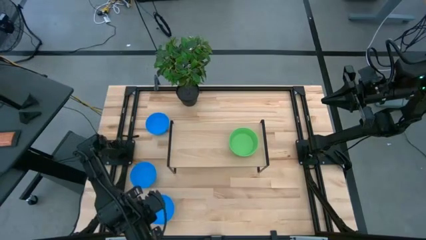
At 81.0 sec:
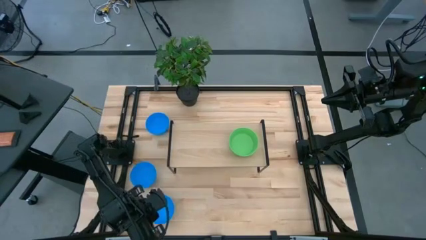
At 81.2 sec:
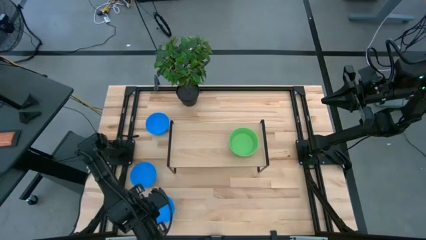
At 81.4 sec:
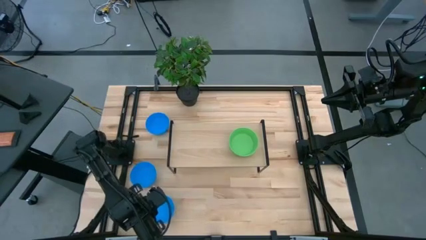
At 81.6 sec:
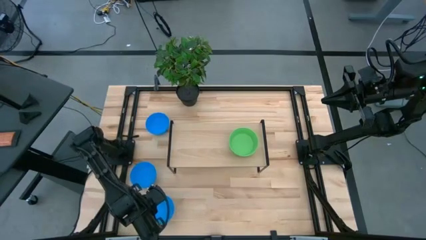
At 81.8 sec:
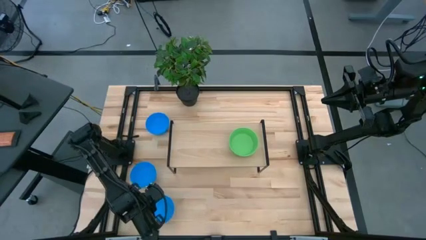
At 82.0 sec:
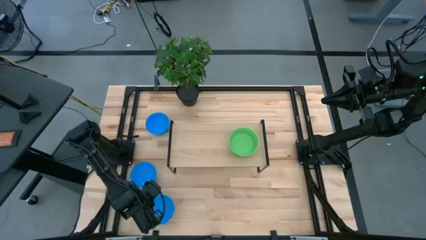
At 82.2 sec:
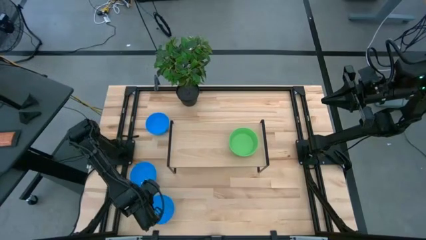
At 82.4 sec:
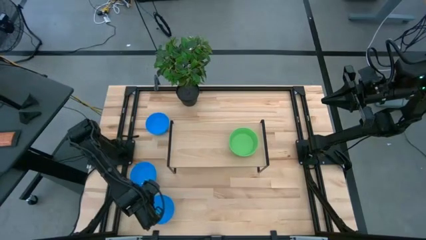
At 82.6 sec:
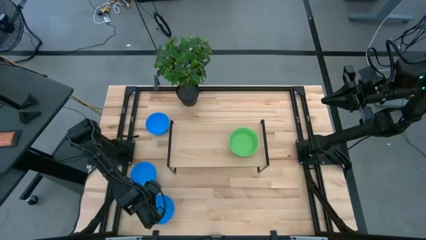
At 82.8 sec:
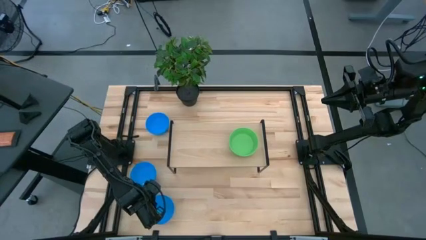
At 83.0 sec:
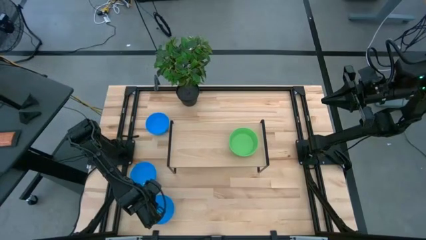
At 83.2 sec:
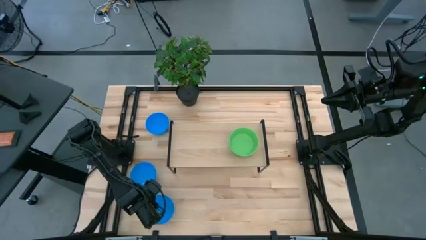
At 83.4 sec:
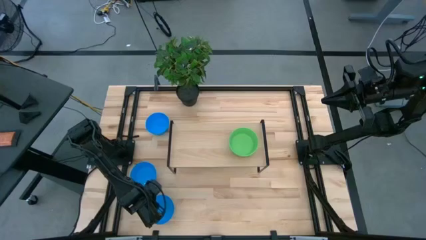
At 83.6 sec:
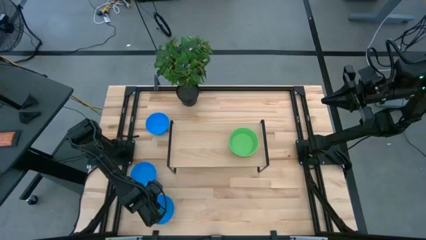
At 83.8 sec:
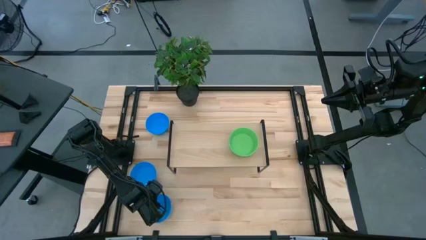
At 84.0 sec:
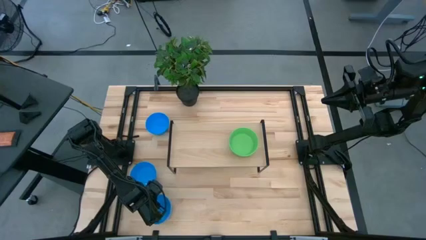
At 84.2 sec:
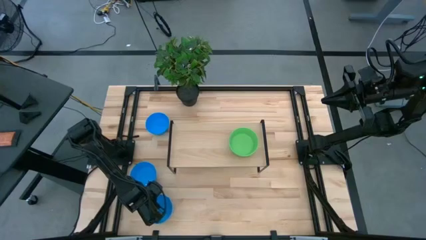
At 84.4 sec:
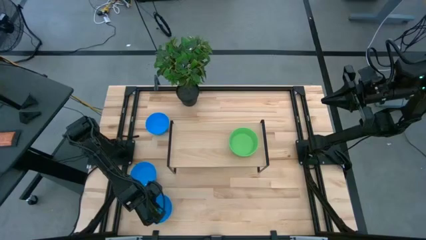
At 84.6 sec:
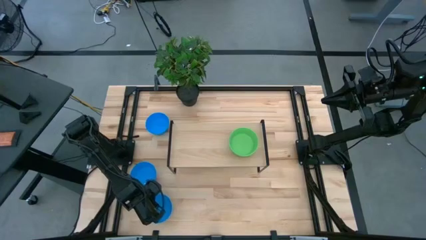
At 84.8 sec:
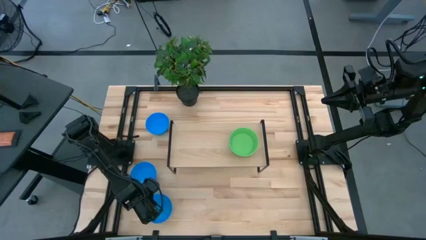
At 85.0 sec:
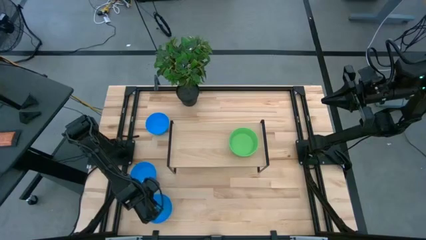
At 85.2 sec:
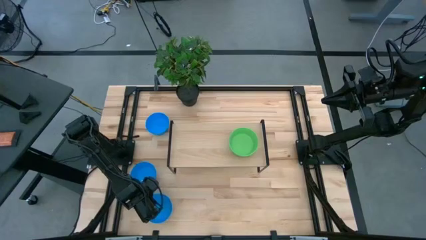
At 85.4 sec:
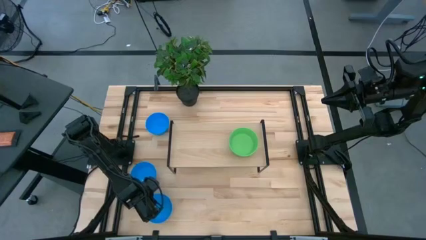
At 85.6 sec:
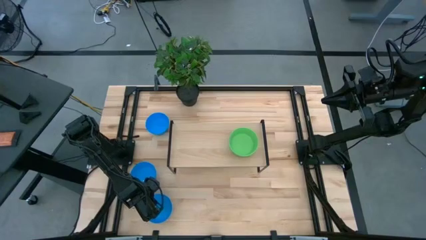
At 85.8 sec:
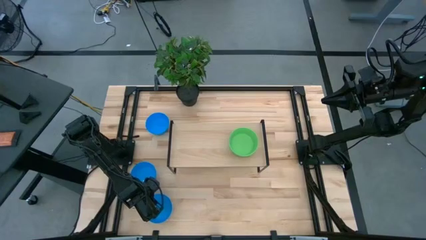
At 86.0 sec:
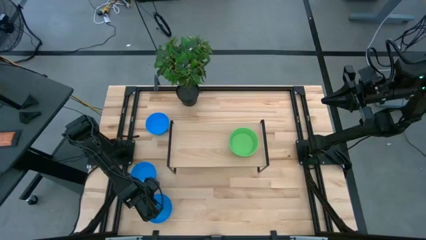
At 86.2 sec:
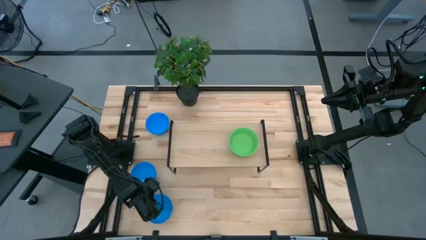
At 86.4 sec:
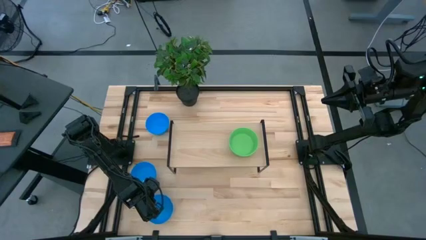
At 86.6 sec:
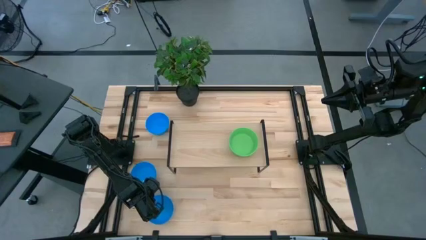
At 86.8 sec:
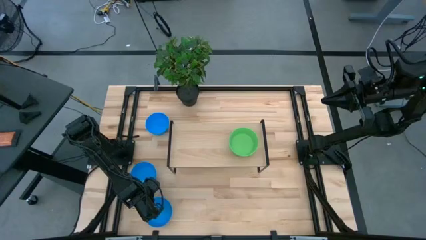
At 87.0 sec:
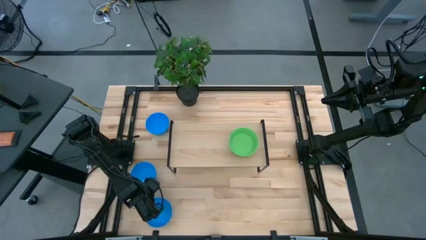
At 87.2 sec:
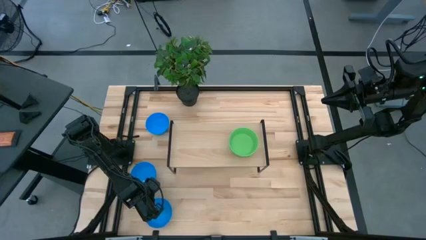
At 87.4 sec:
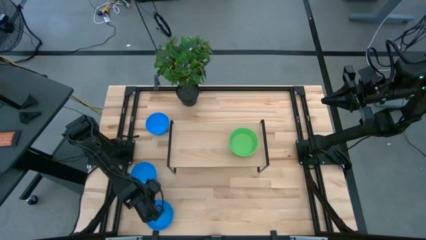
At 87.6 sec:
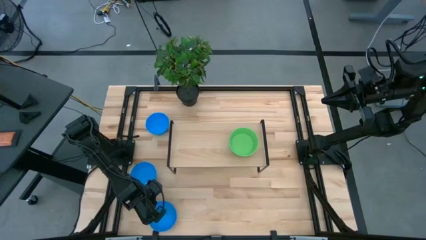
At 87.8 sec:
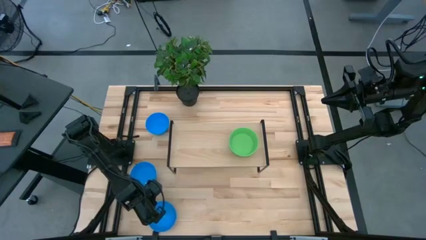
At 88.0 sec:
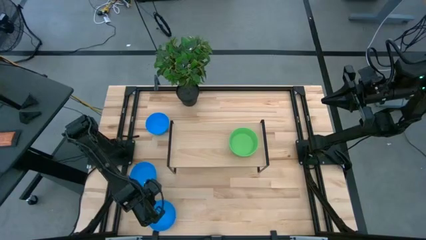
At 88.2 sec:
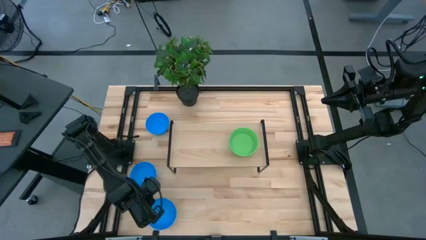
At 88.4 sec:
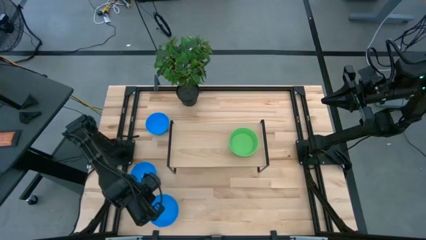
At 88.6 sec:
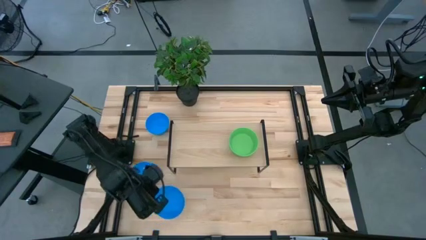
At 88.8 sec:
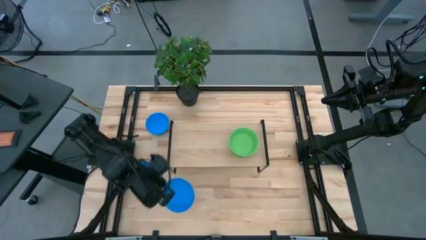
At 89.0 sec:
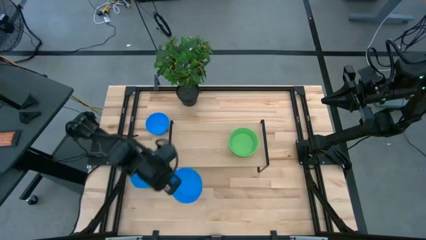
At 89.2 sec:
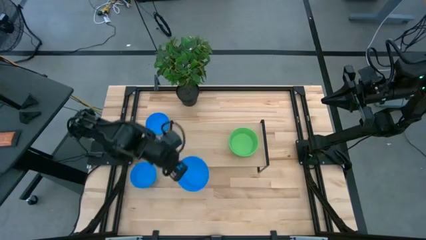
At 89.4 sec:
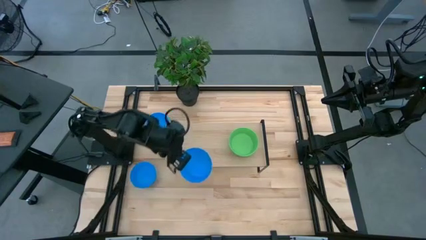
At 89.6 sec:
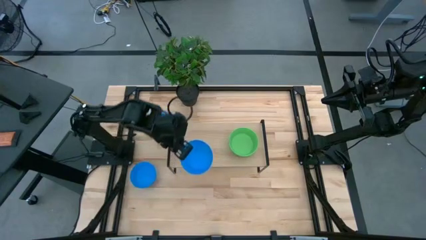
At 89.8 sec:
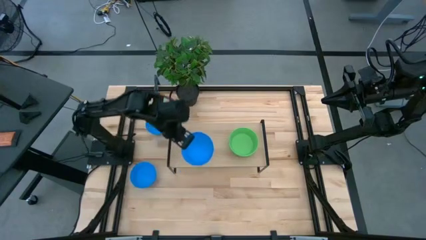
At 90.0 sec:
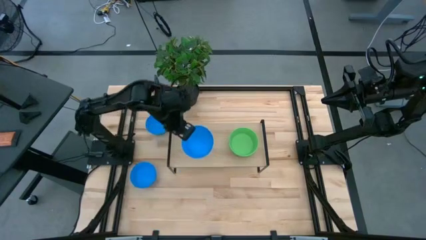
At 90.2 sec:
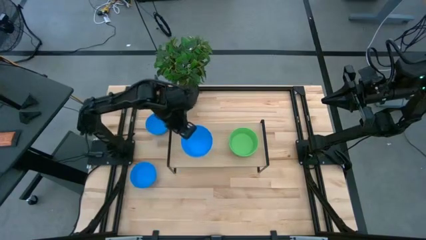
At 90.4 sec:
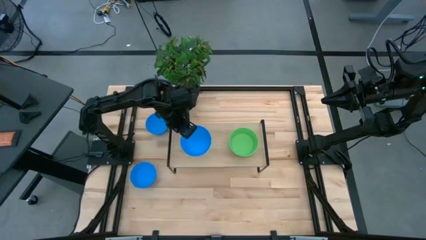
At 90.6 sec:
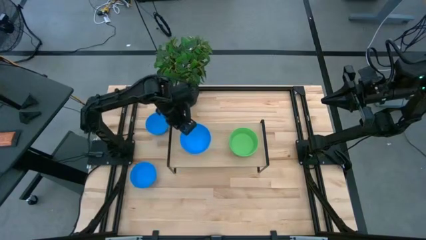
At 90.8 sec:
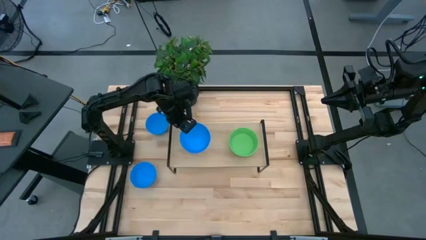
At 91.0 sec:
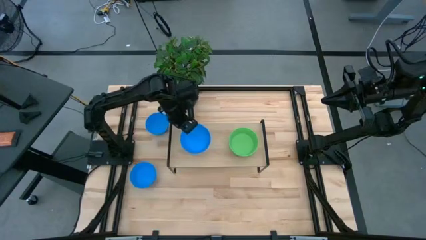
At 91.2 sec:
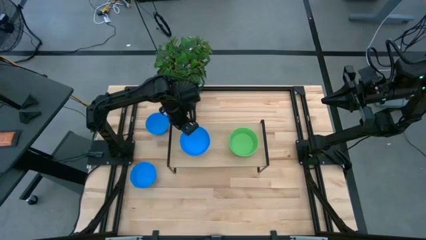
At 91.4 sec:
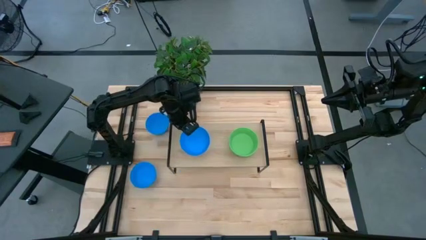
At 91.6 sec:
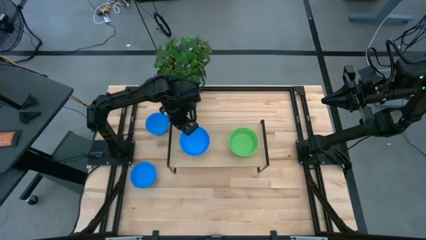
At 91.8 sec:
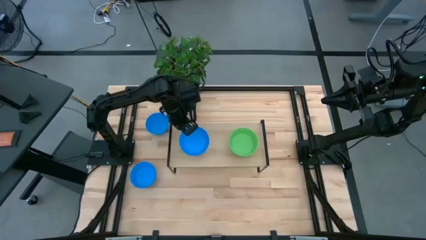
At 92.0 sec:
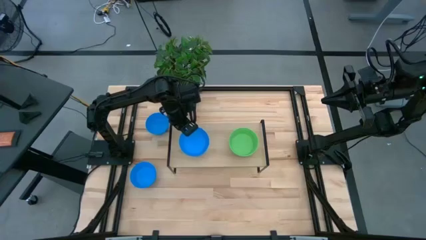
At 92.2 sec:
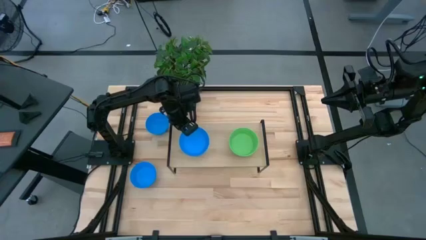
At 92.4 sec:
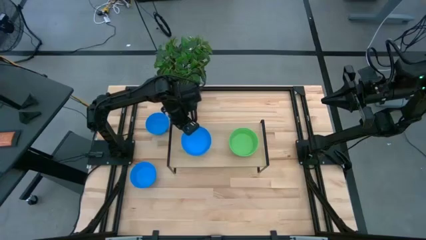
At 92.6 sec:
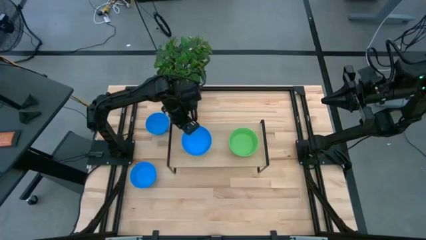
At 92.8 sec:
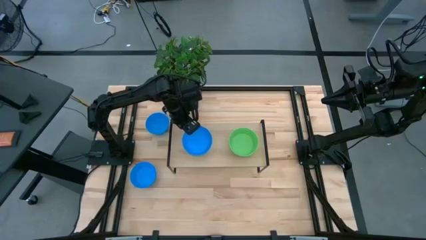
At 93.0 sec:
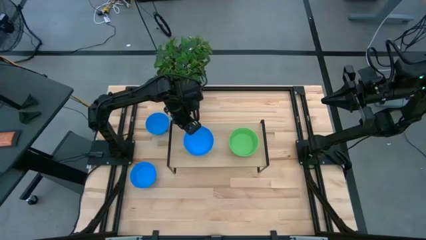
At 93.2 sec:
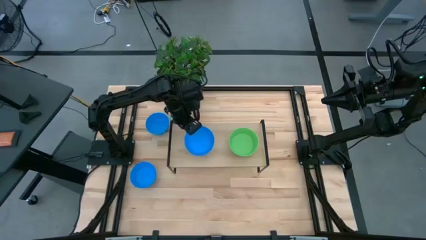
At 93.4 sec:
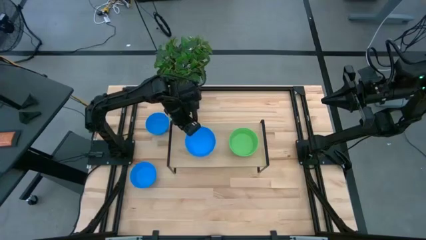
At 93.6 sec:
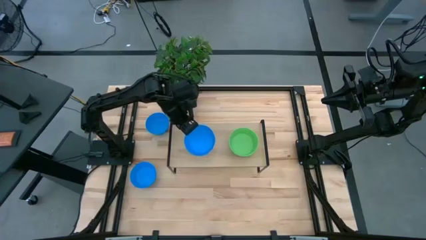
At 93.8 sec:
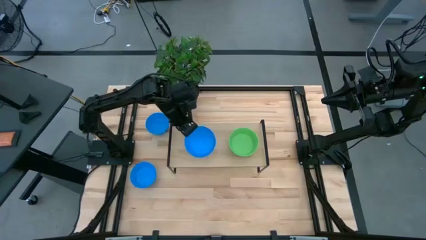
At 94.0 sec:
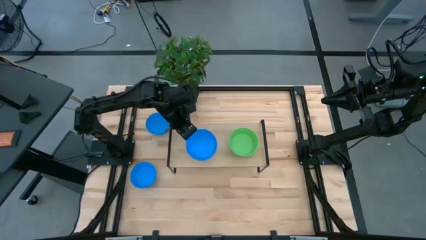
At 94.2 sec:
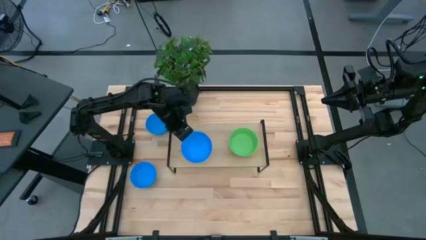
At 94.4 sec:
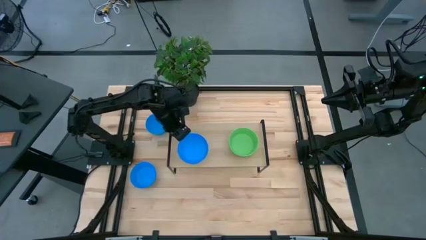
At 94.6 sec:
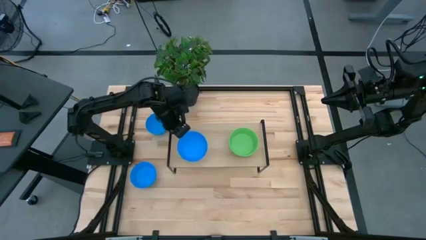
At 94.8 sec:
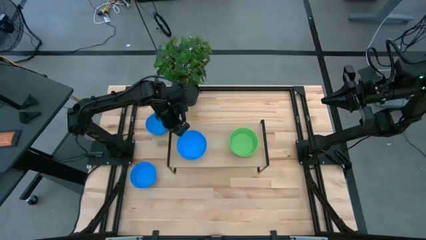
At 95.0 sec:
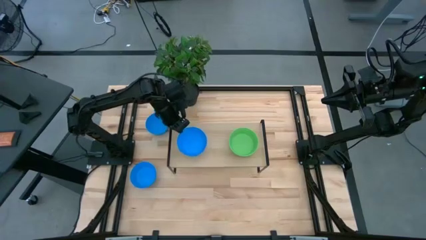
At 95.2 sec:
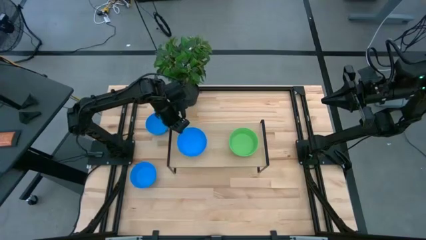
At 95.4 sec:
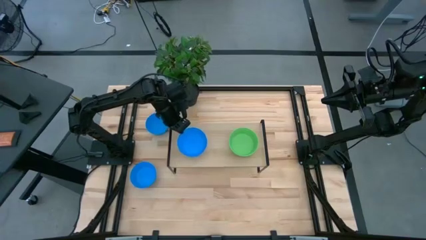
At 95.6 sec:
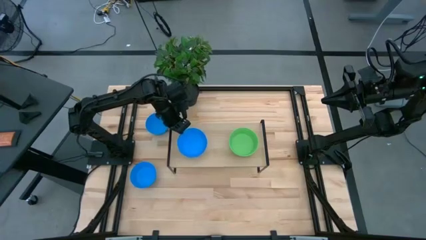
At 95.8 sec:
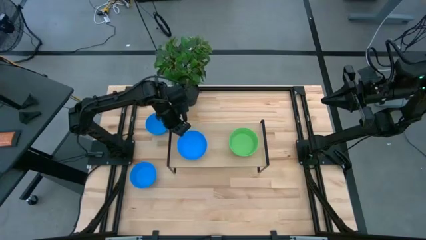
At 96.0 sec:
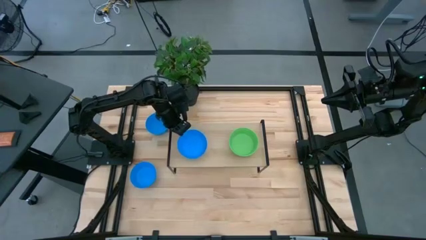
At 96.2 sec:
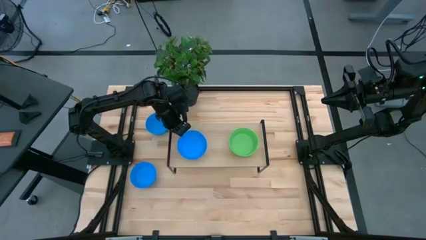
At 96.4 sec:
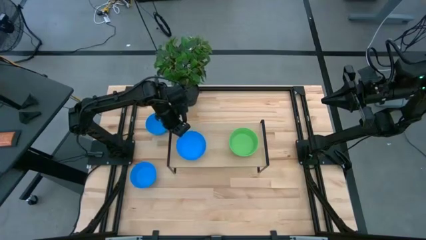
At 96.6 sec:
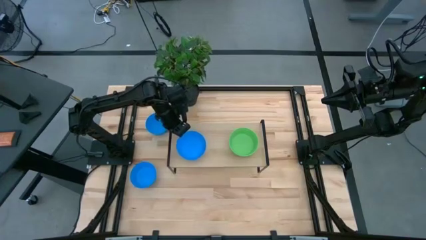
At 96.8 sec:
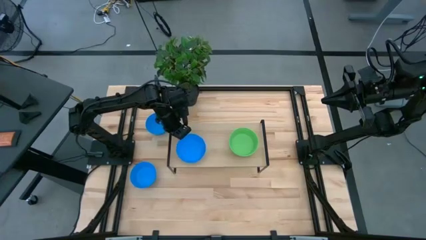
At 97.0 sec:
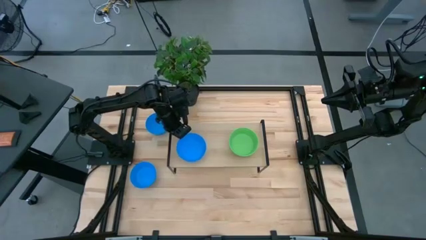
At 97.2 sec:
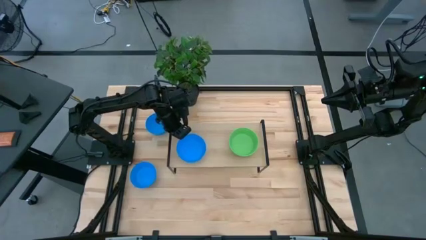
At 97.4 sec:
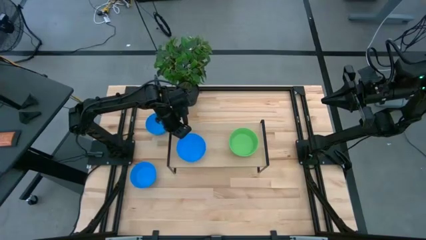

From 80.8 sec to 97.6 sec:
Task: Pick & Place Mini bowls
Put the bottom blue bowl on the shelf
